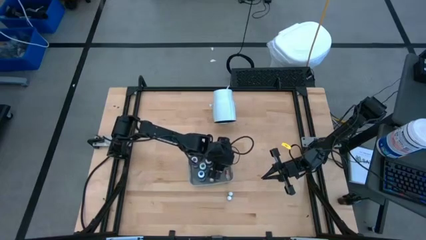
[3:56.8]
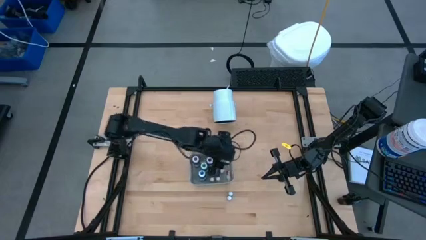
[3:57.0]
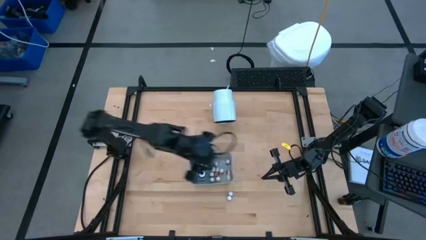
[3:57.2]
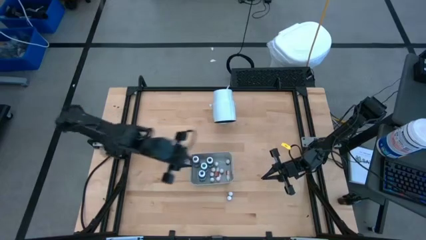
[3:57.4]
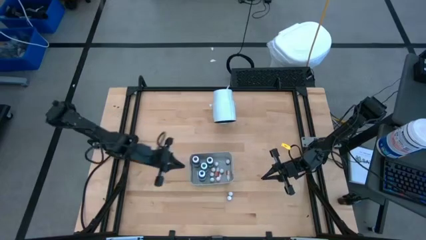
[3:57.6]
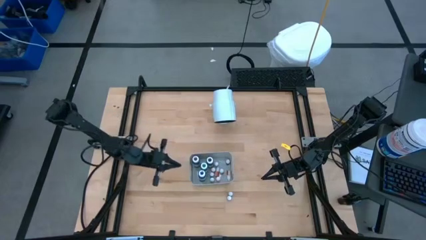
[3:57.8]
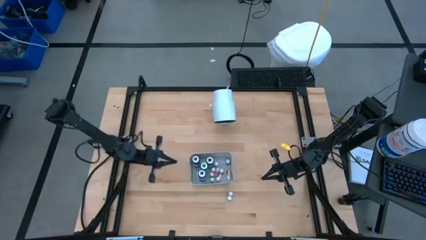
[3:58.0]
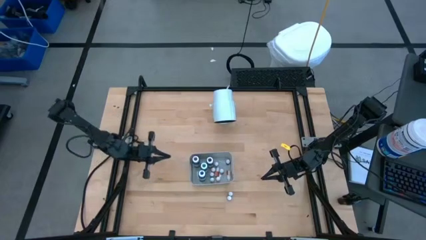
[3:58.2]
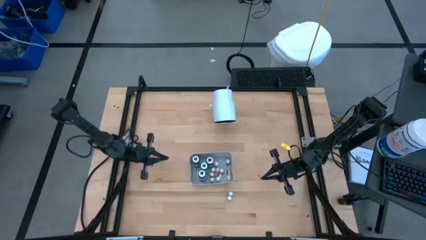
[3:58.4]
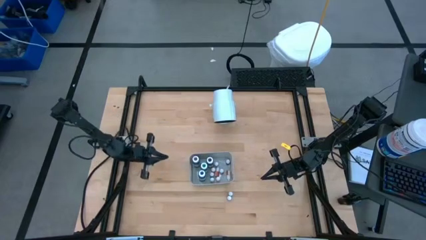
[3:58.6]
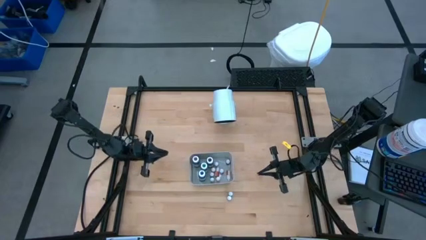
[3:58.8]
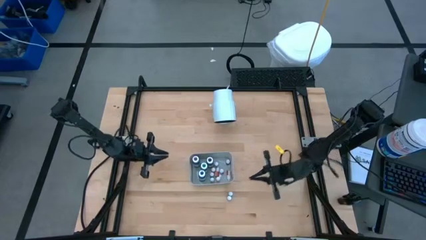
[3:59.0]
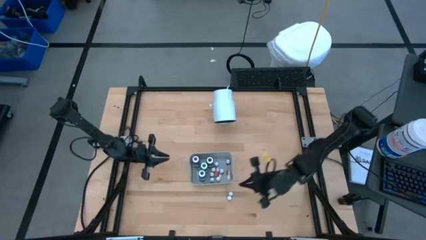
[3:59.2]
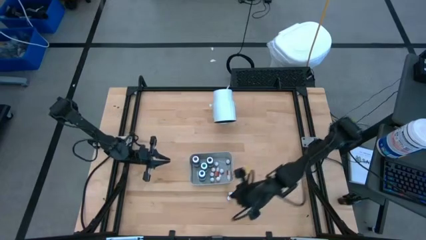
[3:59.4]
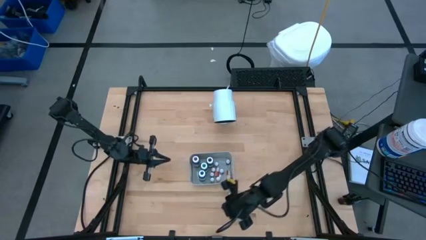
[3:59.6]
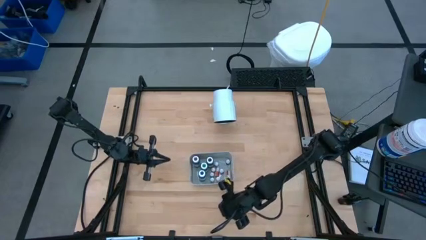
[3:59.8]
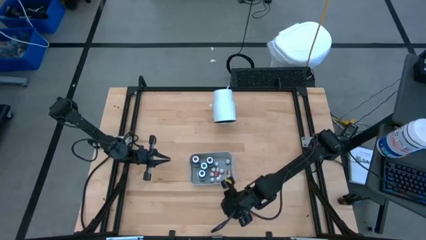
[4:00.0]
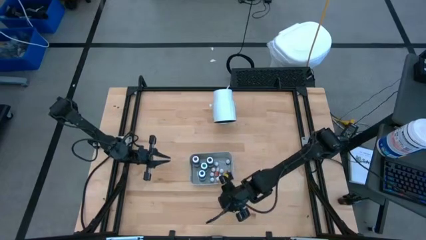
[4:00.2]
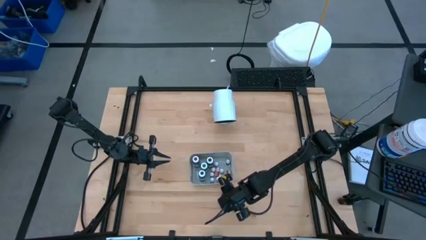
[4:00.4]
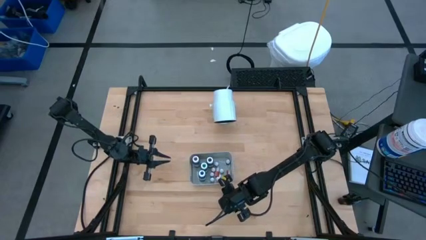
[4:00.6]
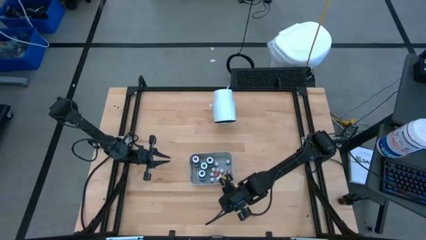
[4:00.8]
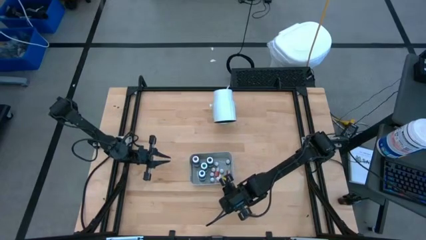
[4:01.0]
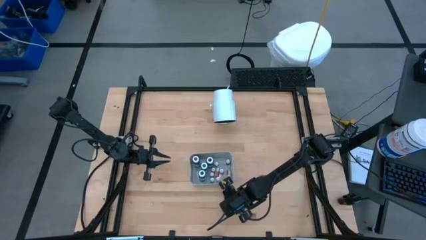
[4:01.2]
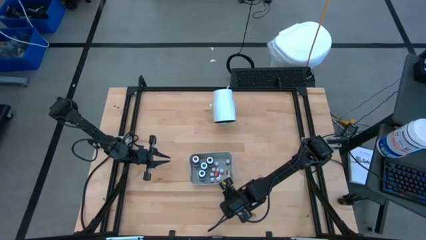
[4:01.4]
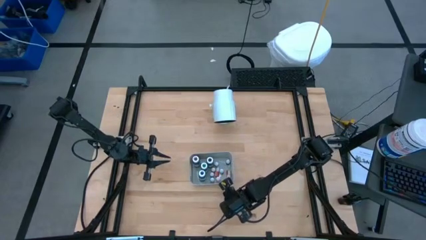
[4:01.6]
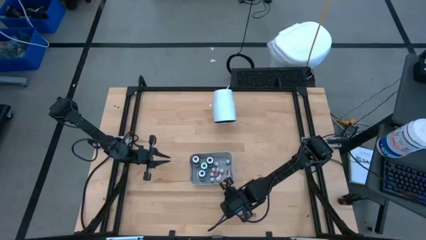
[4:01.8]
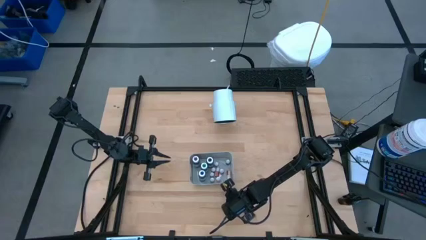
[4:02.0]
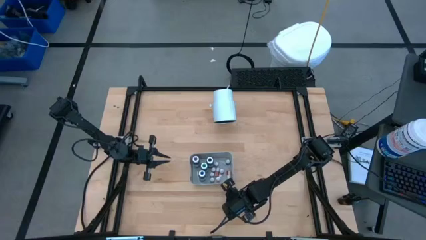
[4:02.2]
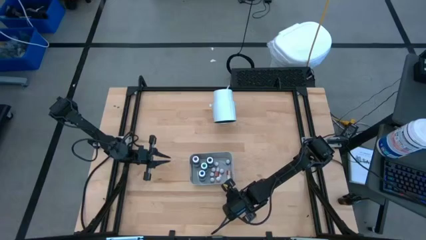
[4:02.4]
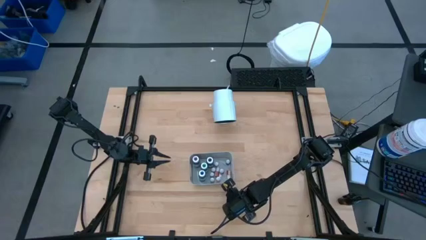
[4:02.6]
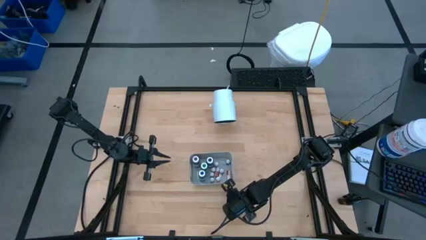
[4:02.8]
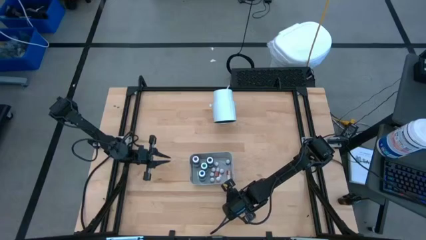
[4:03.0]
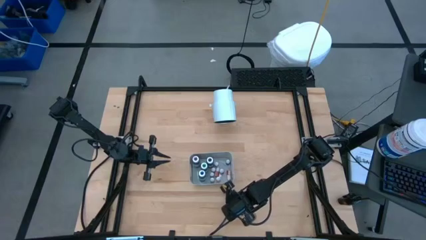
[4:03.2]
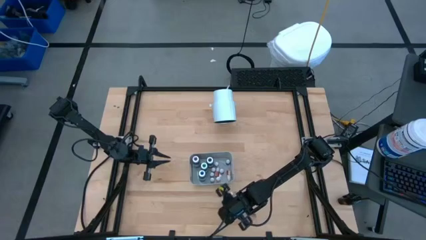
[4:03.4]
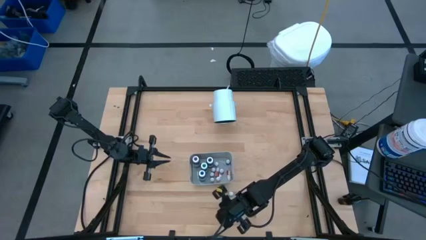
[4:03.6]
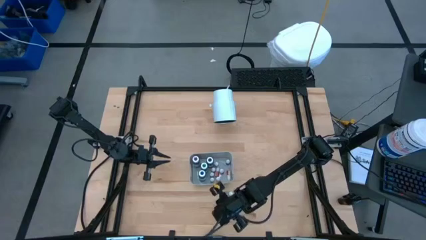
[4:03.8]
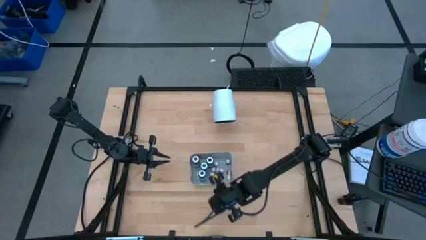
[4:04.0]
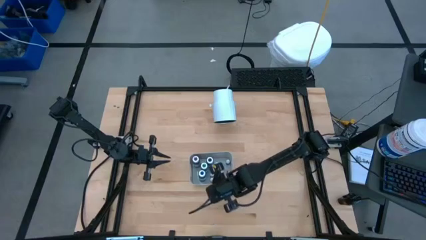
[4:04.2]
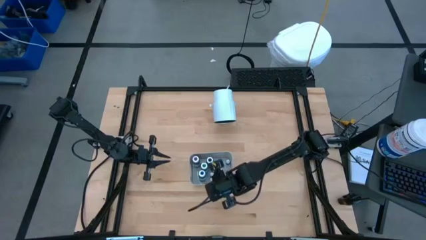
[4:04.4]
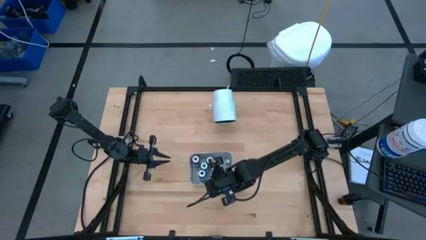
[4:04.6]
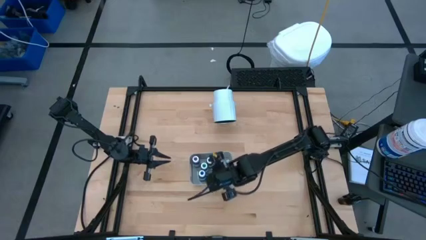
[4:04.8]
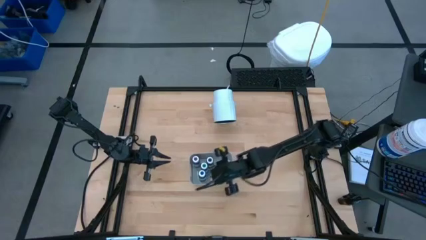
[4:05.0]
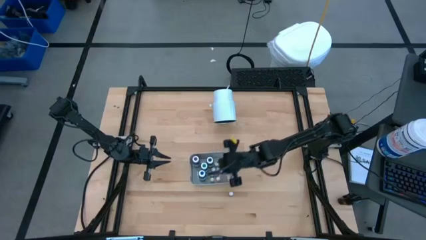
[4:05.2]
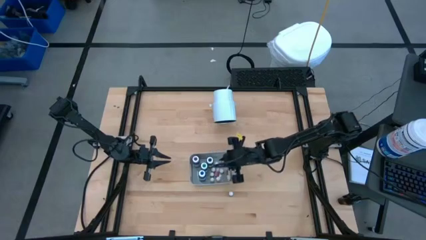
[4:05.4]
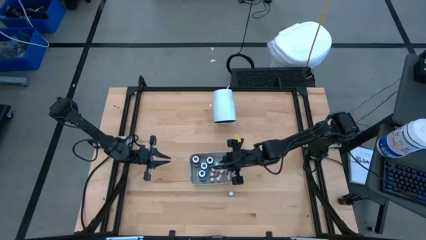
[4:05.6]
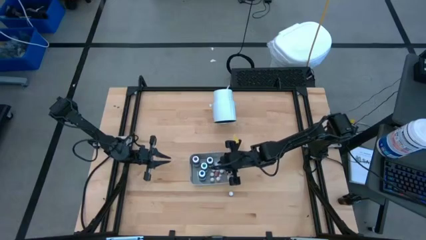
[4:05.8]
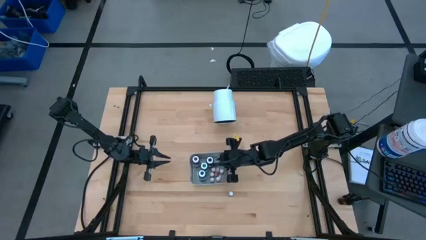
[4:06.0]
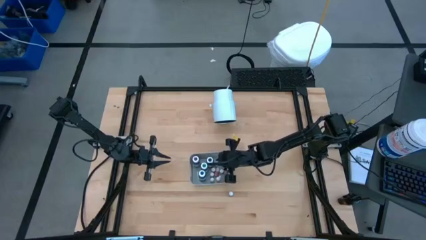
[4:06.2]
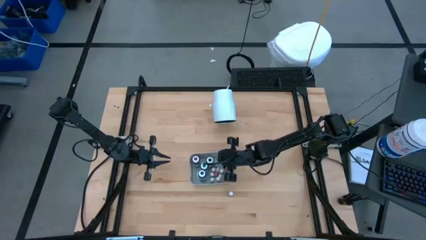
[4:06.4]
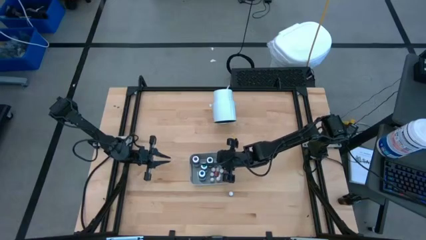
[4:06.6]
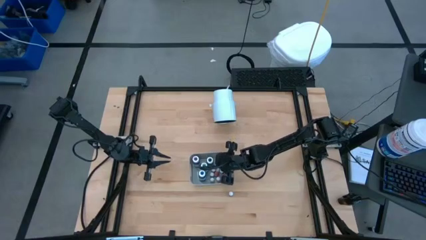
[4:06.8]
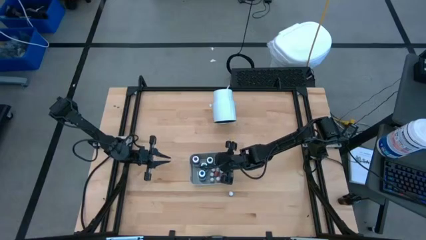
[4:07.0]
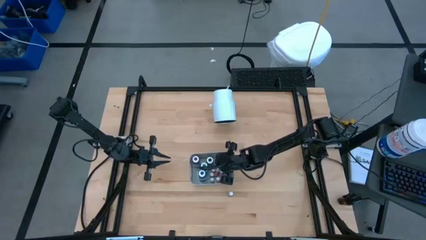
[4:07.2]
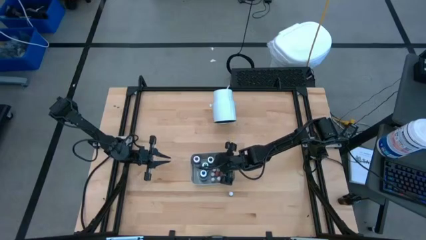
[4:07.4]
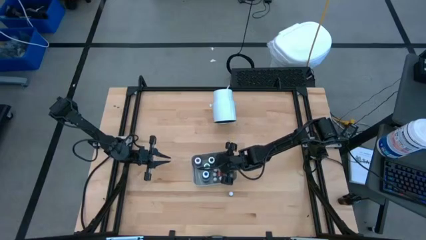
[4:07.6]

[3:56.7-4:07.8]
Task: Pick & Place food coloring
Put the red food coloring bottle into the gray bin

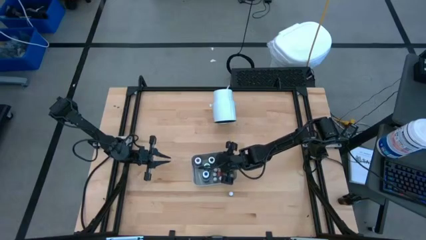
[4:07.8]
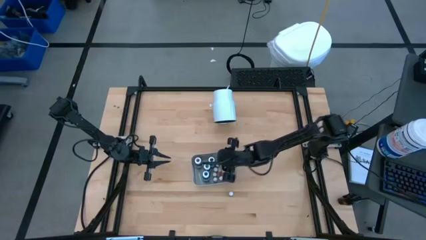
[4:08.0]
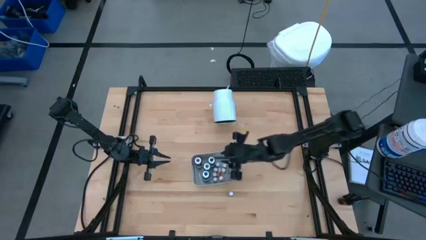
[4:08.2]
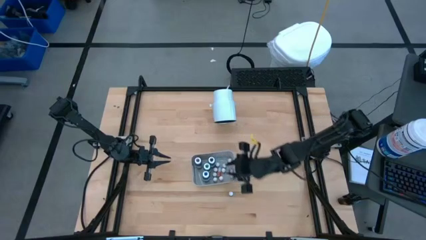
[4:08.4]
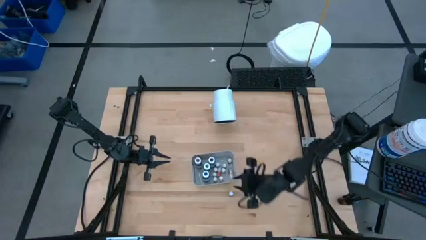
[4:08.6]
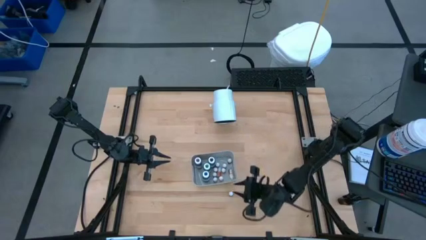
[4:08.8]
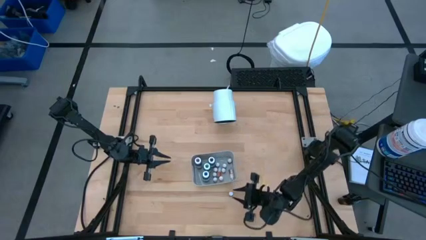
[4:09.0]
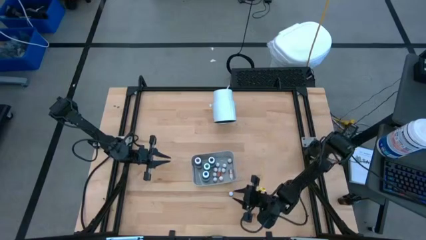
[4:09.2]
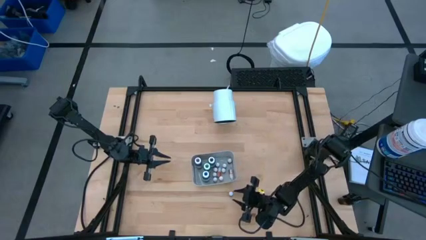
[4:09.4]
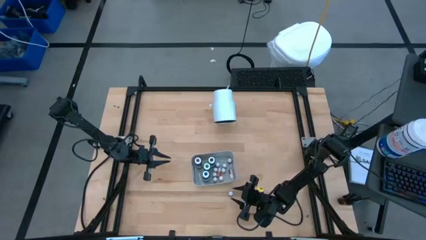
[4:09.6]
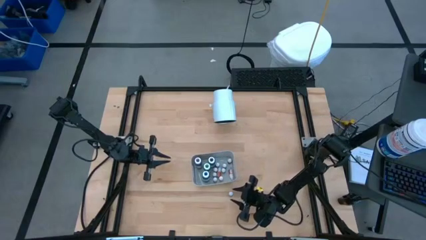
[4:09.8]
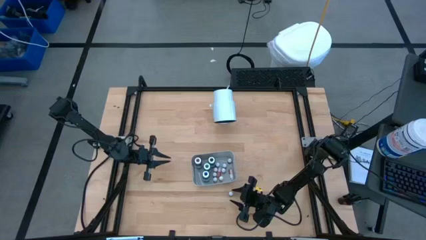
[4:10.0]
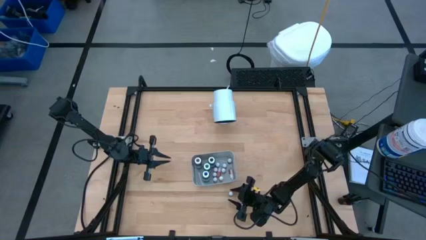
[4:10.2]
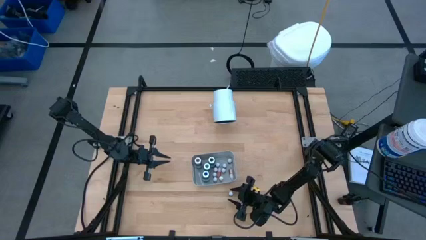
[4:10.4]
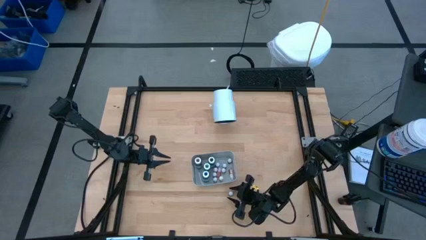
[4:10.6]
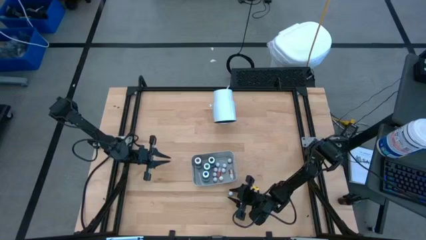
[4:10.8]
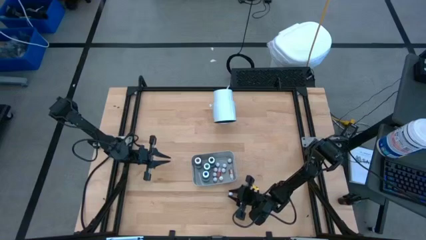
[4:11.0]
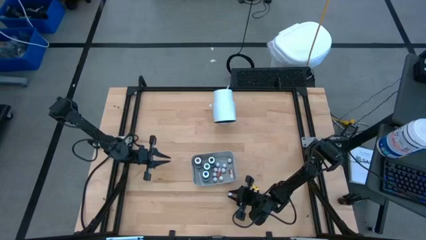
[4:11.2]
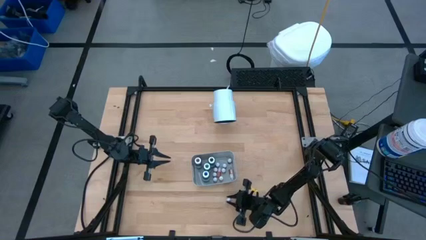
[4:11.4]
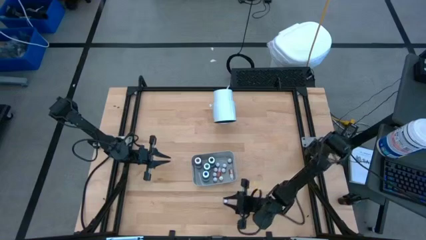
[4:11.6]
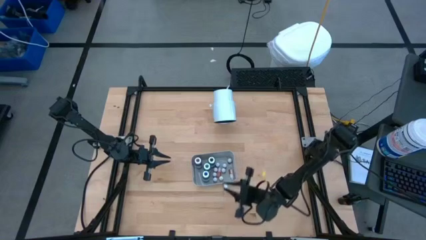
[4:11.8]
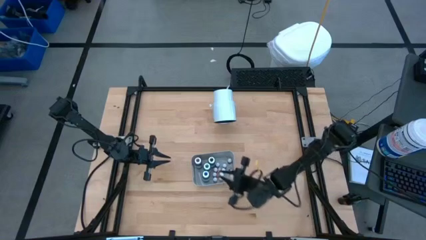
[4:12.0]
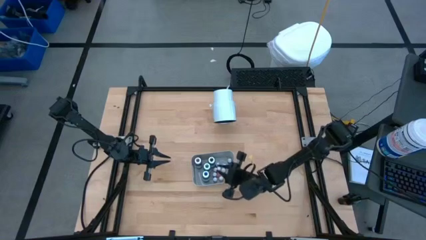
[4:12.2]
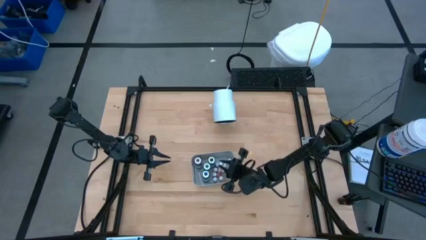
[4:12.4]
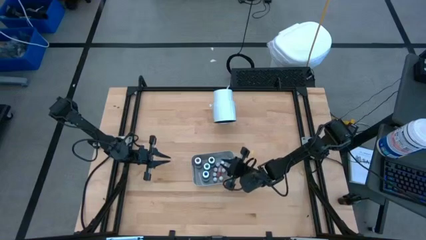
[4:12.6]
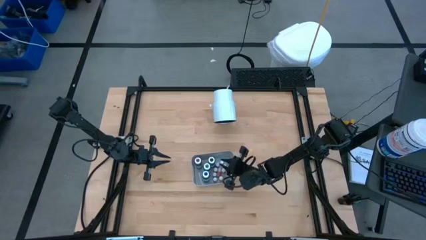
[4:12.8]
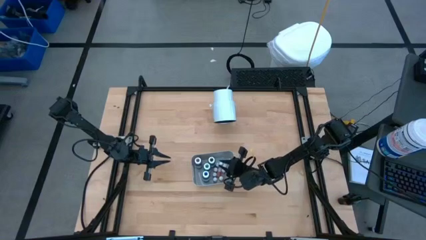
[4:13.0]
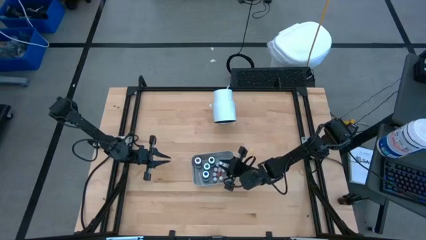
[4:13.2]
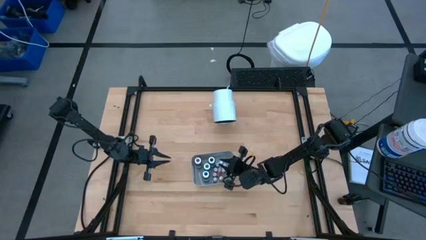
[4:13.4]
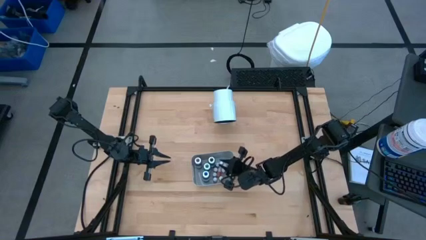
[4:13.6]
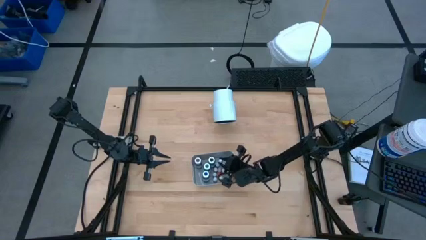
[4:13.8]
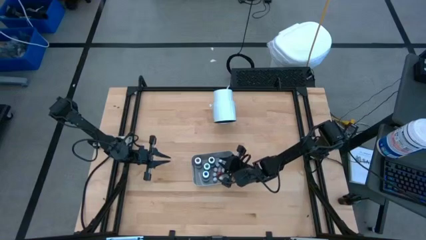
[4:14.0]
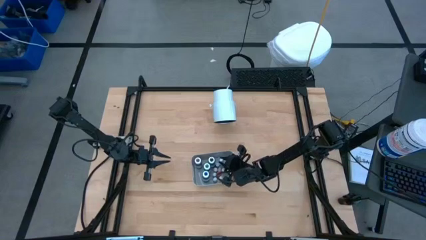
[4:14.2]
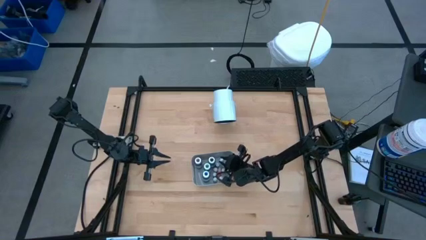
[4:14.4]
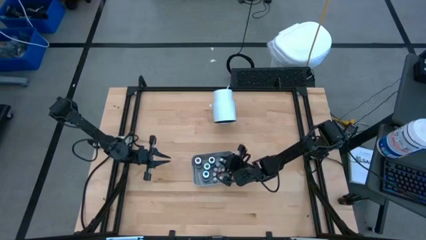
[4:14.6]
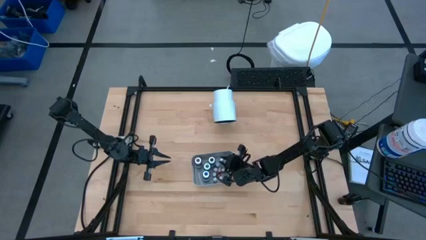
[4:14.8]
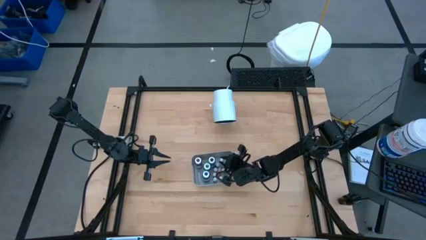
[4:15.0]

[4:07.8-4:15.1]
Put the small green food coloring bottle into the gray bin
